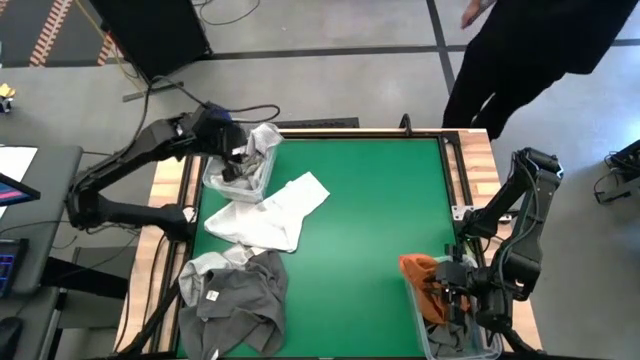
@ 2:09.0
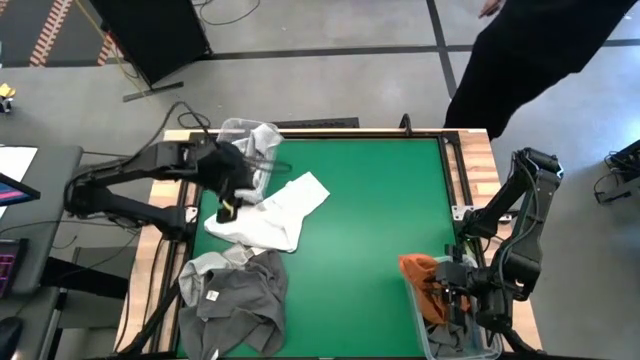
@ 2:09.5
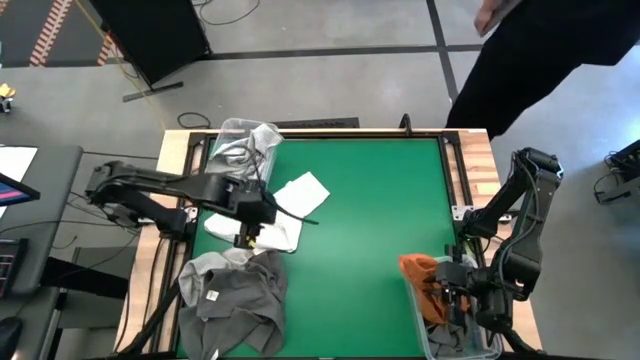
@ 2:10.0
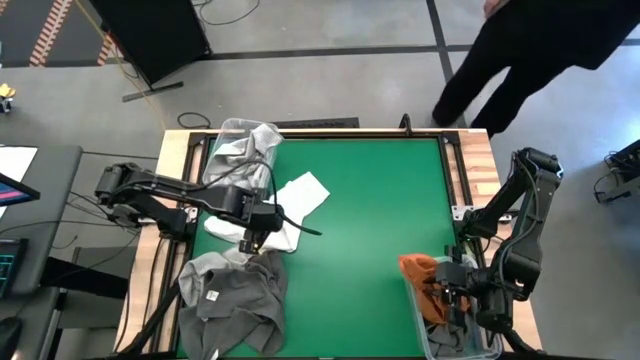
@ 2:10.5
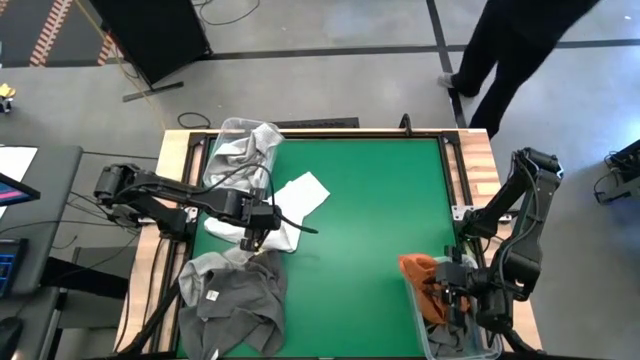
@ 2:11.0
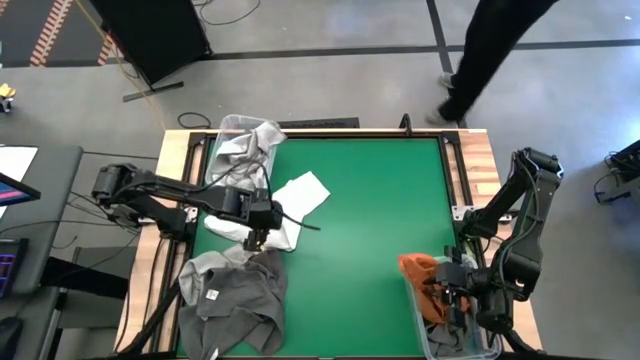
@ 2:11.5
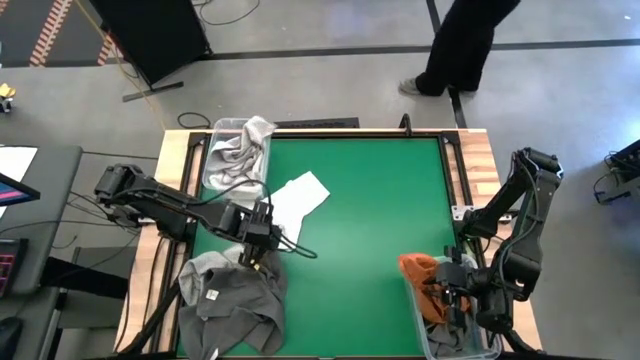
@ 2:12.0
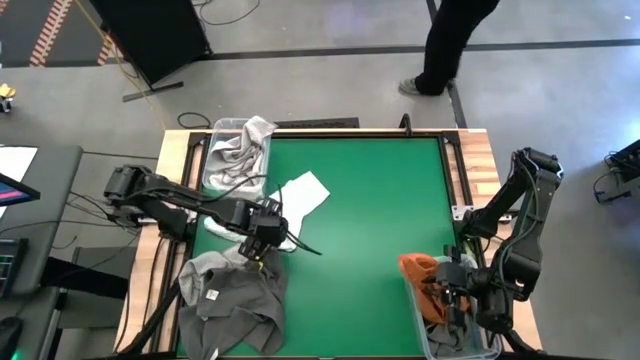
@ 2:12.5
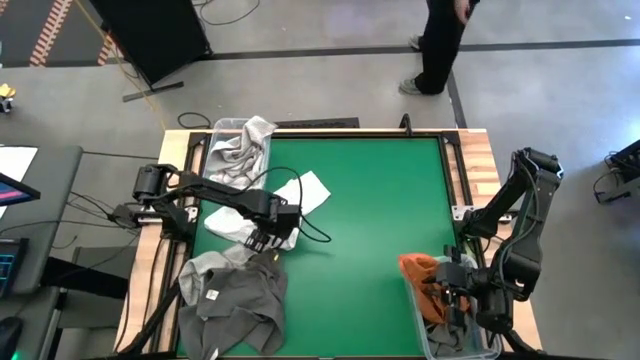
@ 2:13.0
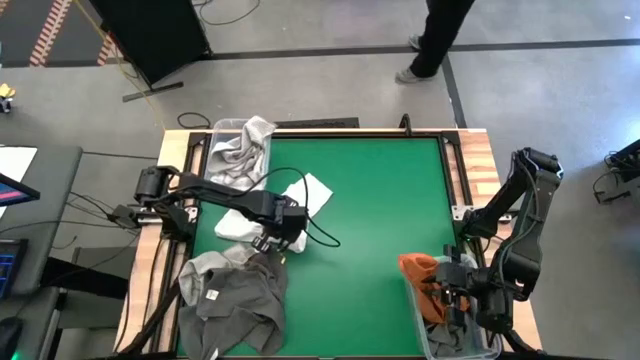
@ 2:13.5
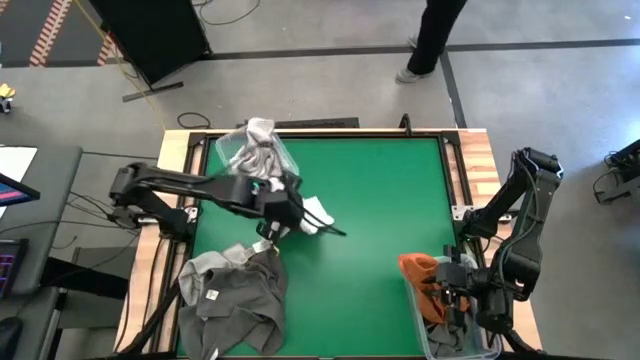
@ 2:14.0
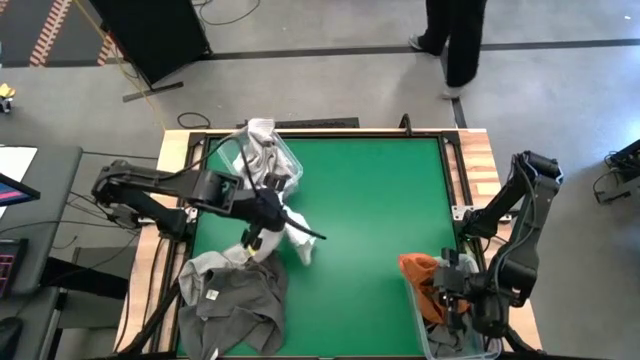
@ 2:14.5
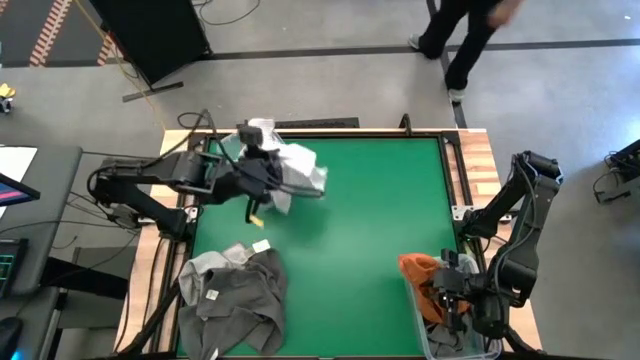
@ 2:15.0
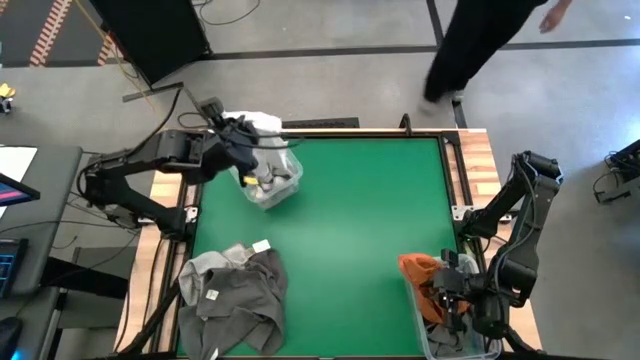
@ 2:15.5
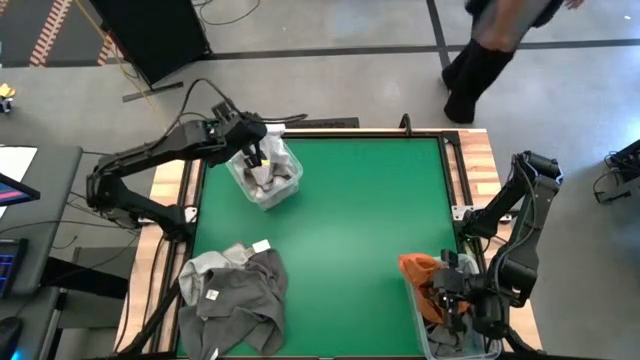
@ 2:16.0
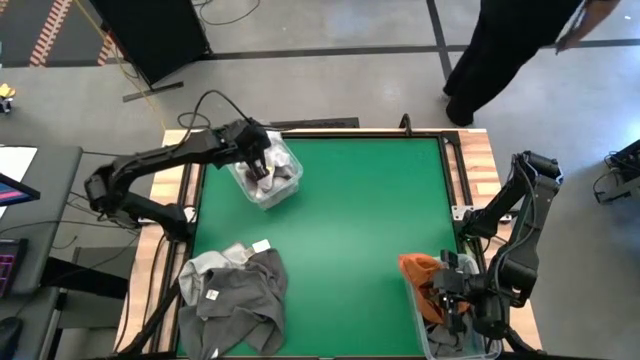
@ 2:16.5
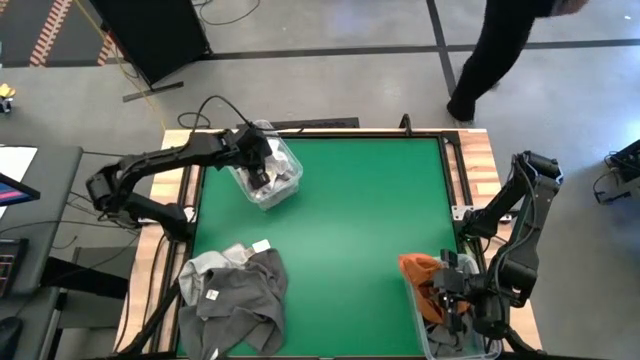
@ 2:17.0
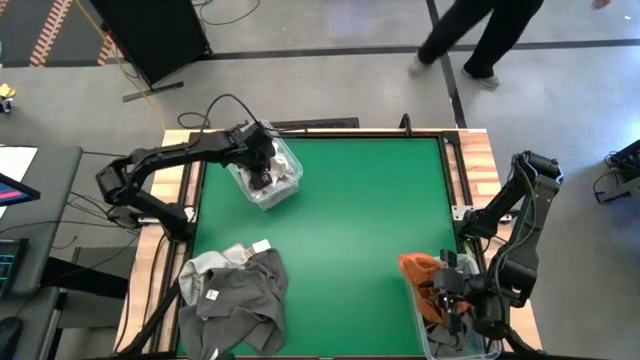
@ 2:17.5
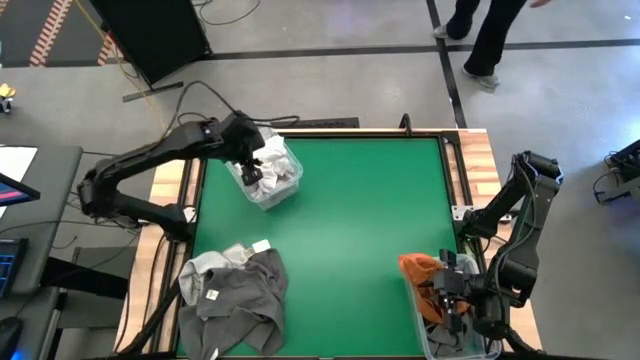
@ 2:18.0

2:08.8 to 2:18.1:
Task: Sort towels by color in basket
Put the white towel into the top transparent bin

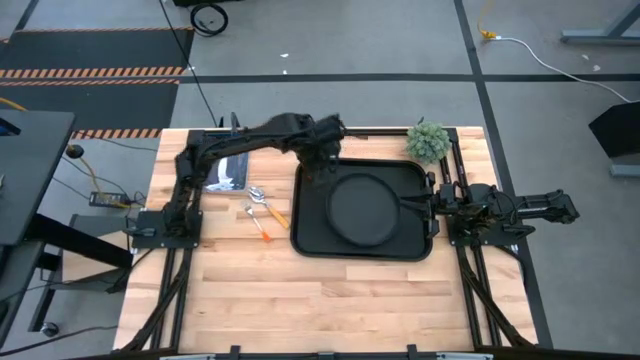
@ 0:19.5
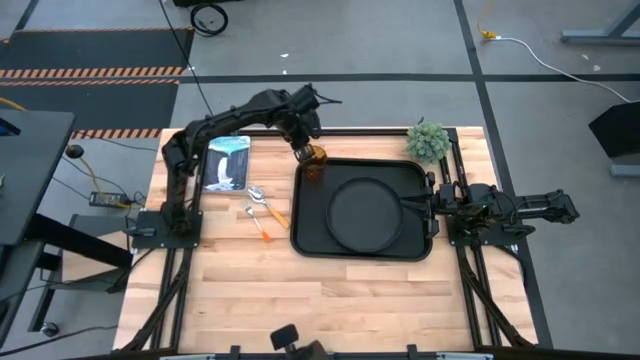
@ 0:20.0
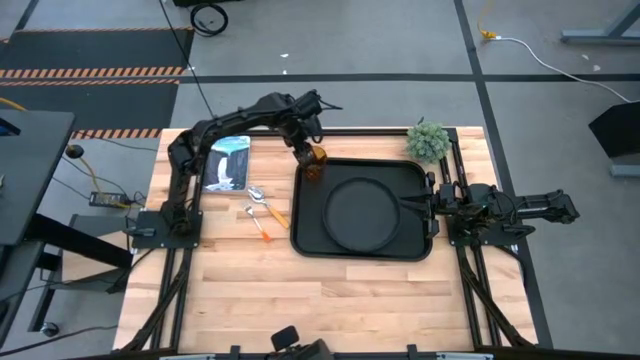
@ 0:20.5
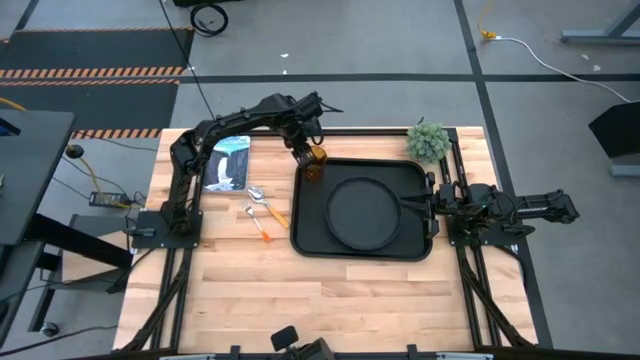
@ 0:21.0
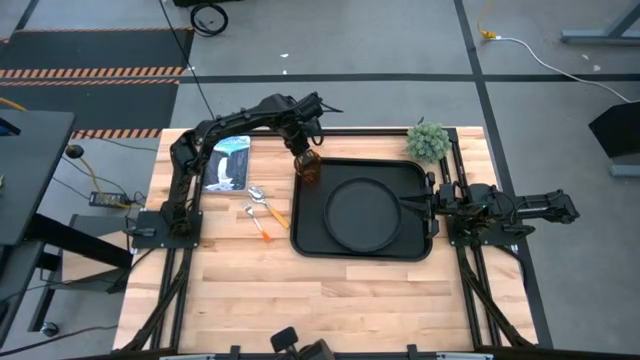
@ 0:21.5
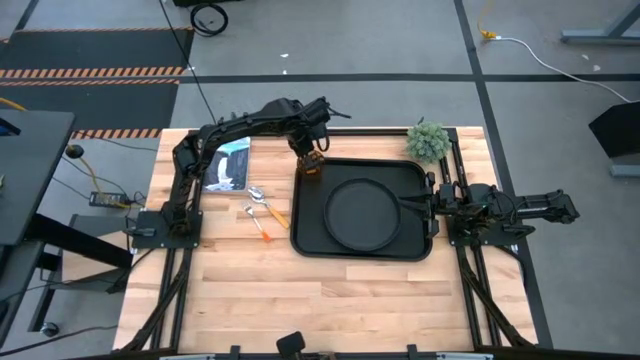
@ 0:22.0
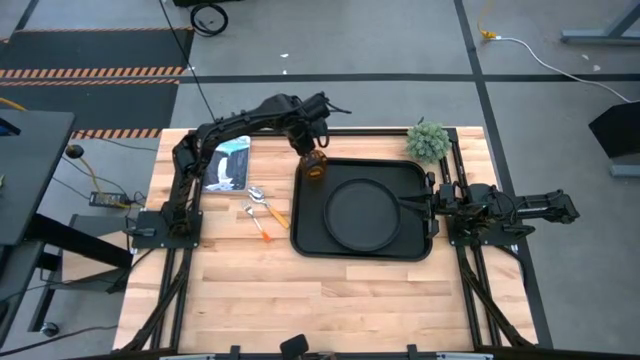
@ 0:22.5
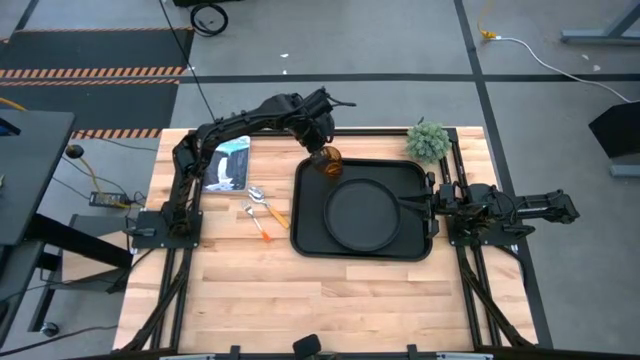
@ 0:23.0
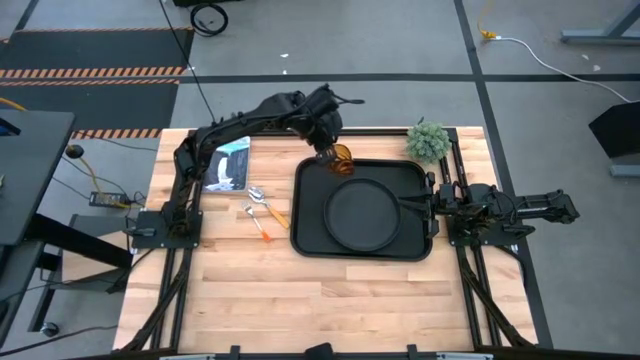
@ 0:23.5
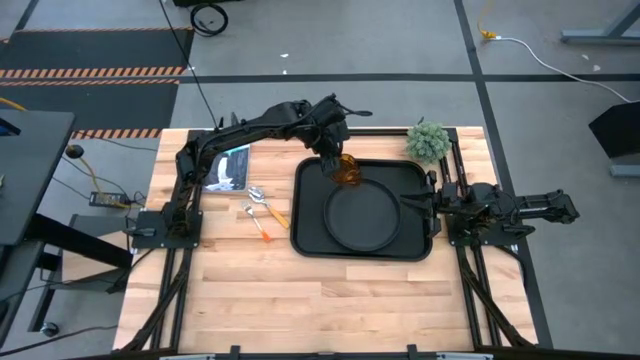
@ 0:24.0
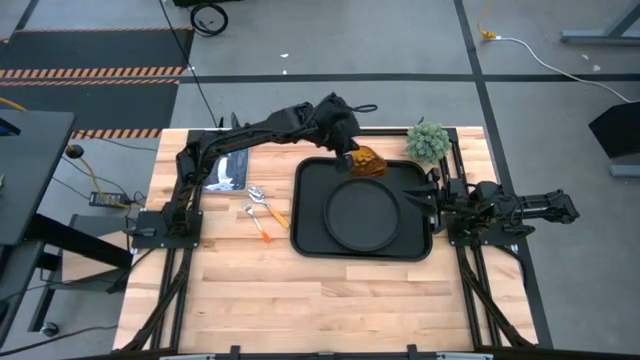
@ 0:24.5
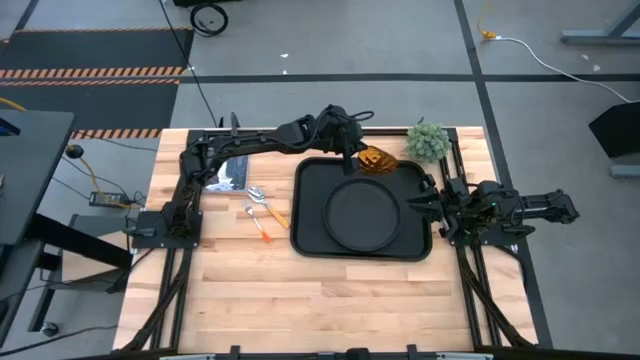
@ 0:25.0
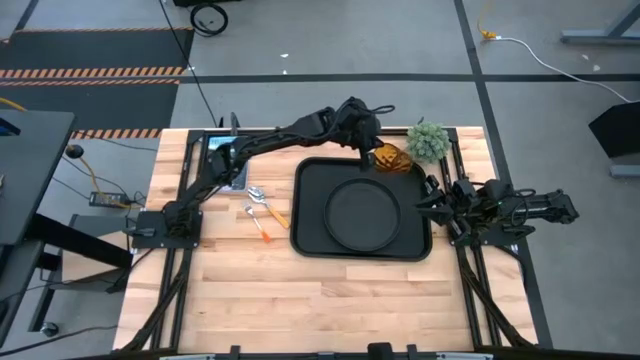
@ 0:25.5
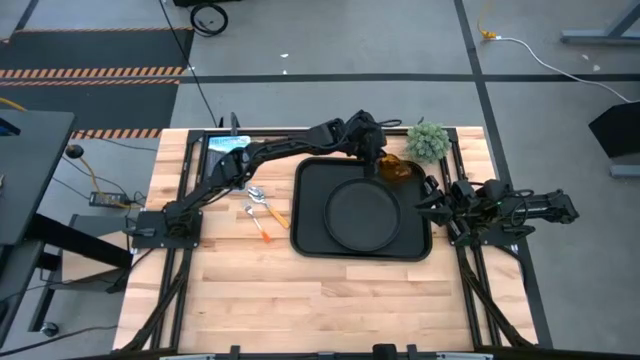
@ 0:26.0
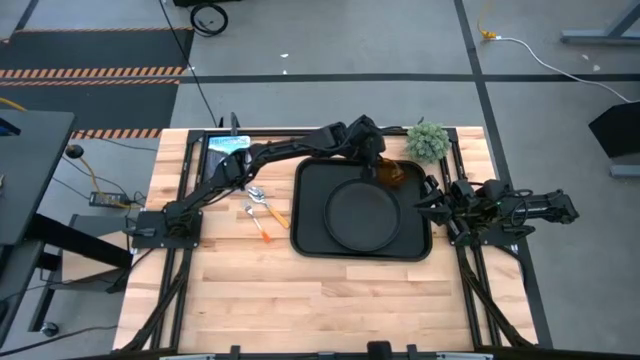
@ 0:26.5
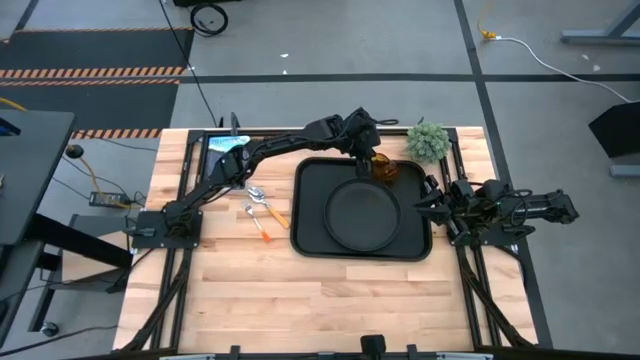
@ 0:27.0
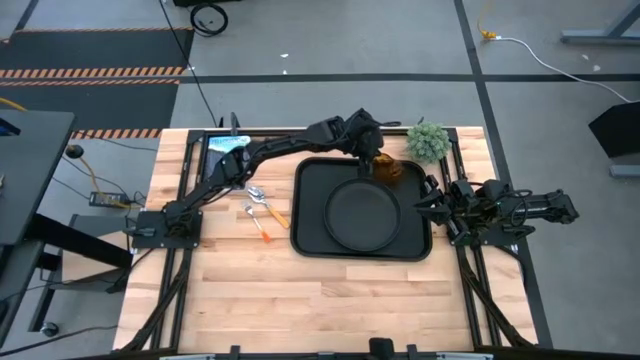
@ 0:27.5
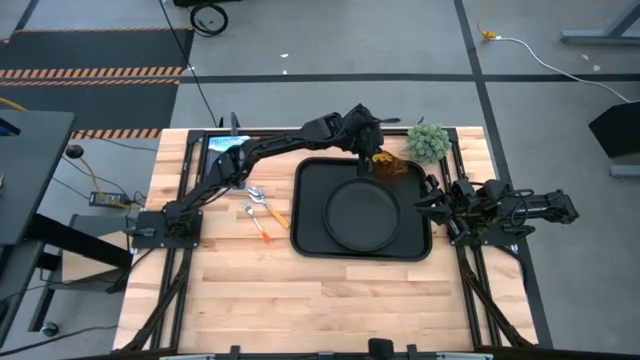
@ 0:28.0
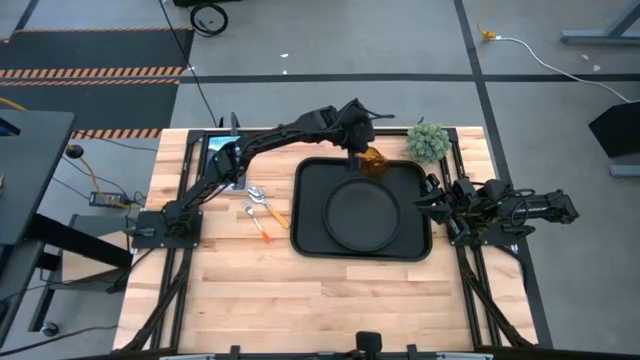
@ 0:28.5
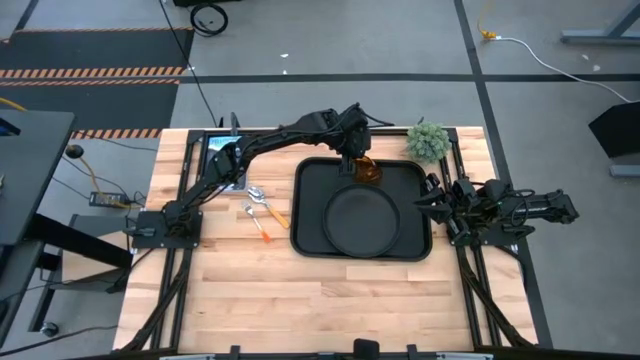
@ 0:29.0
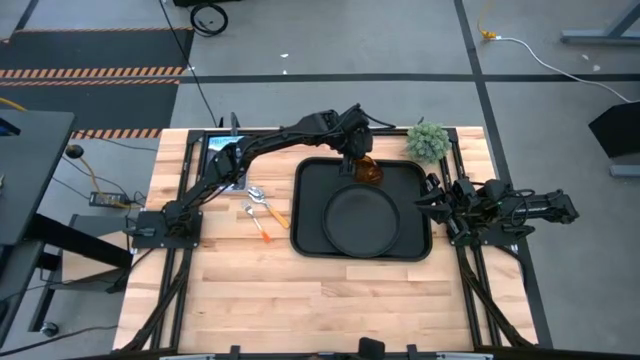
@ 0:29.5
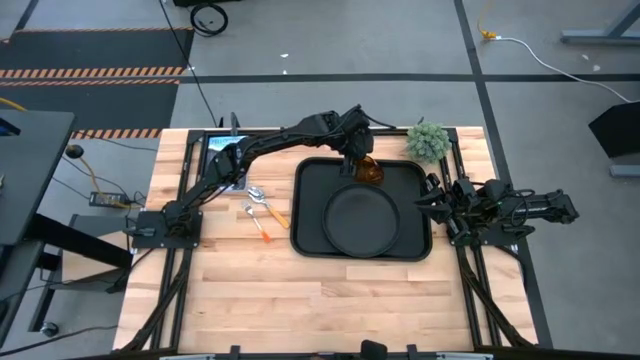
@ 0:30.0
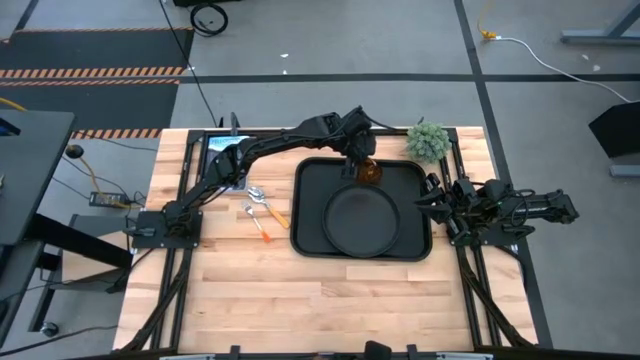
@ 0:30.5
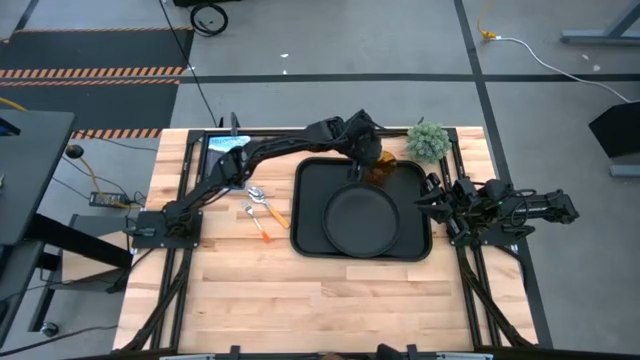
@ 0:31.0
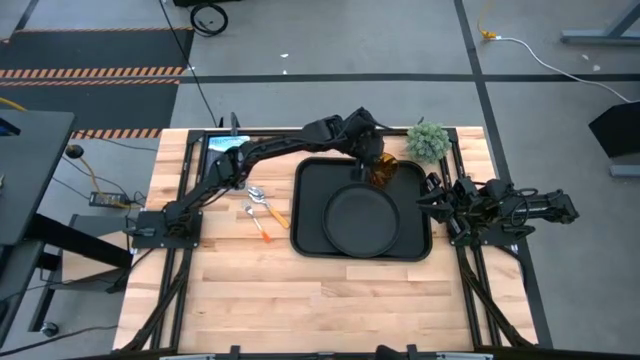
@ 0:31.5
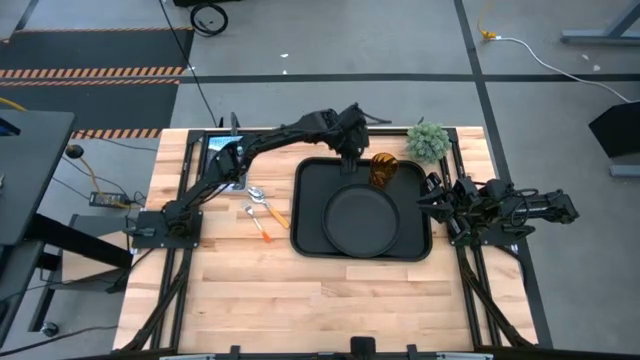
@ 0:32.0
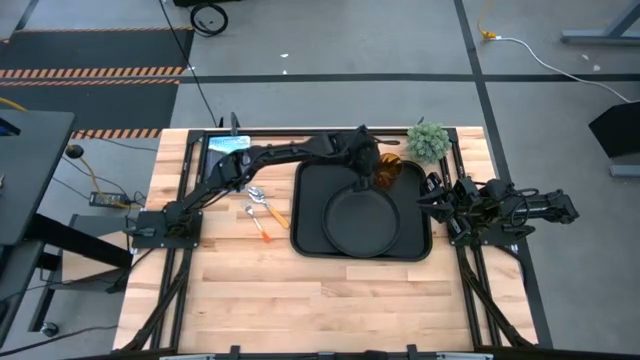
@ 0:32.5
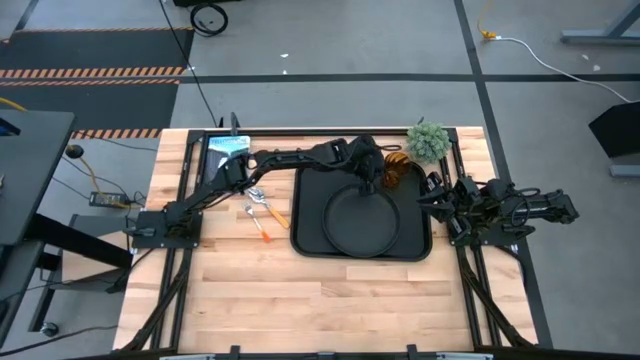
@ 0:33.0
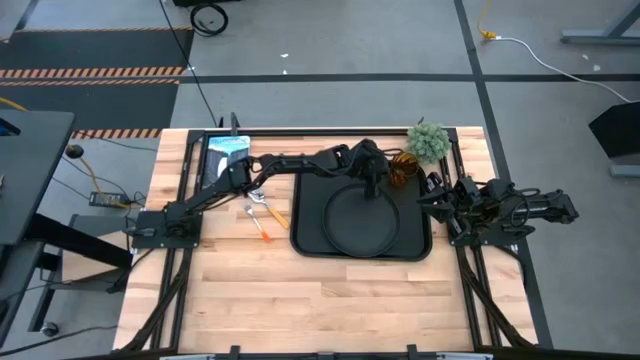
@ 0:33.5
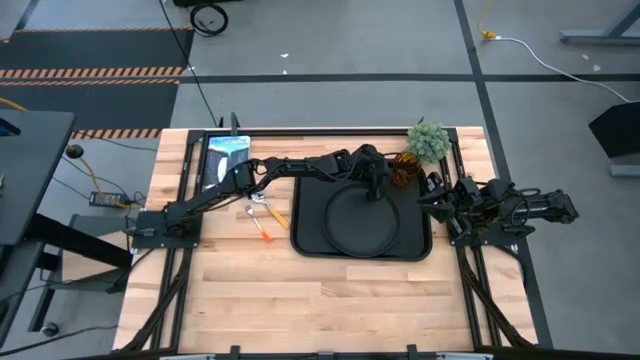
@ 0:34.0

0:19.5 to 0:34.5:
Task: Pick and place plate/cup/fork/spoon on tray
Move the orange cup to the top right of the black table tray
